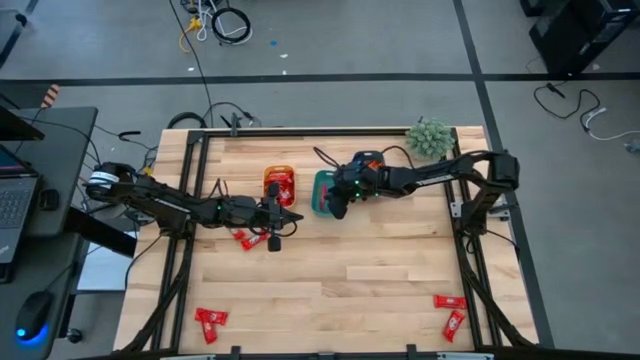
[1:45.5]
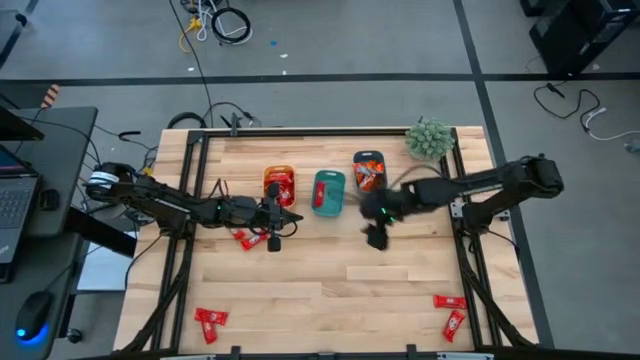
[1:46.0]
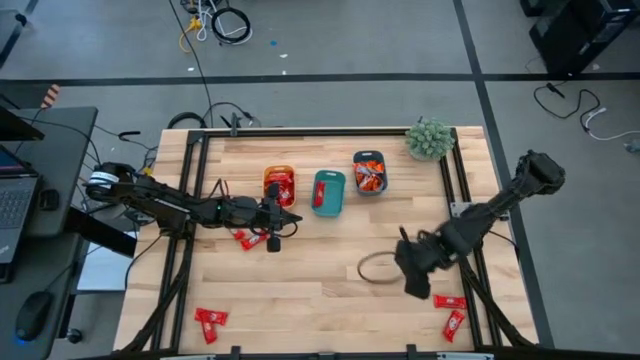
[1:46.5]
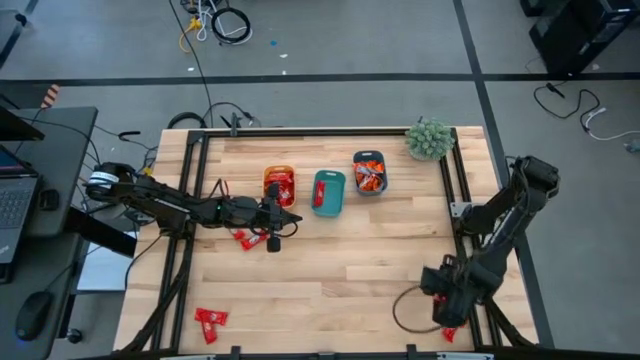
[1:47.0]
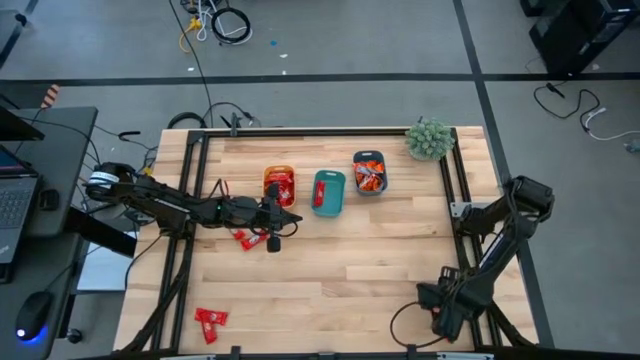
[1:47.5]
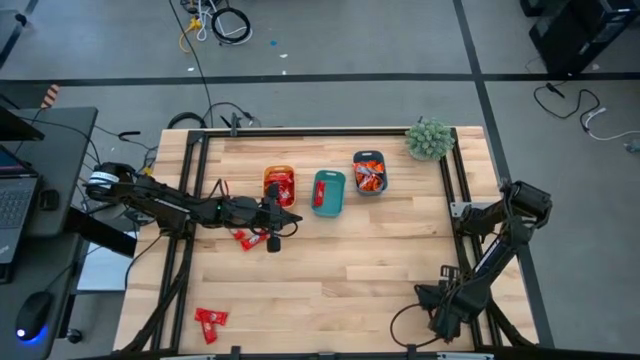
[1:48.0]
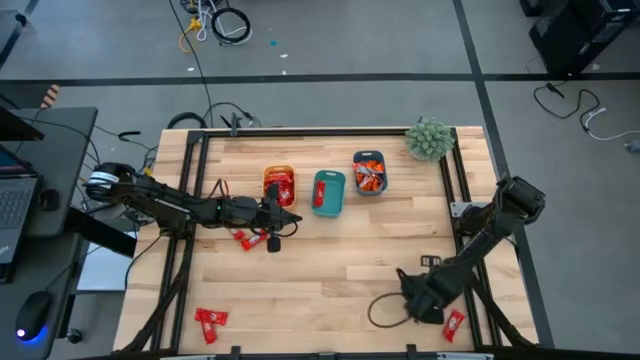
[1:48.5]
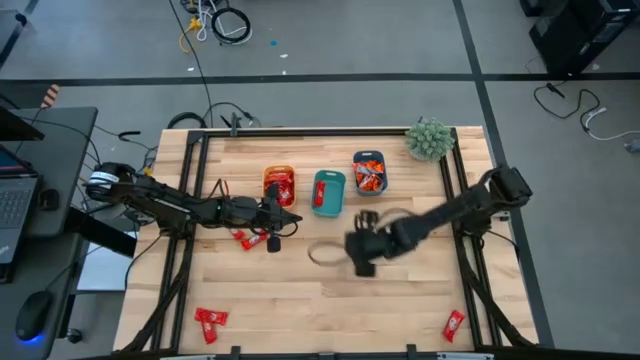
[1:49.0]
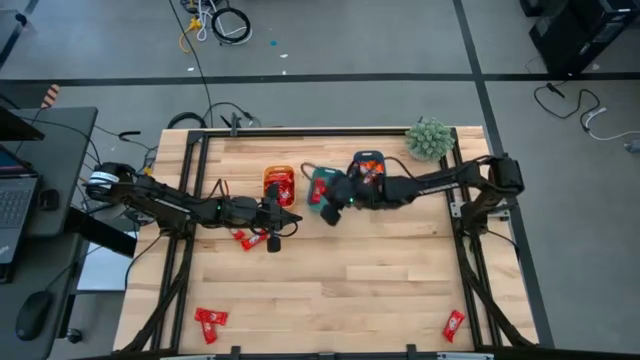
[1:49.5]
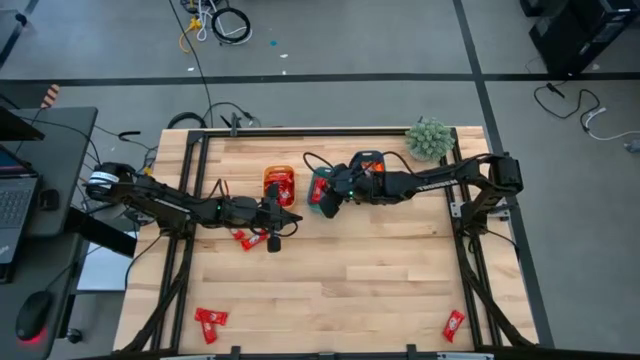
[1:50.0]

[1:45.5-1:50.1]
Task: Sort candy
Put the red chocolate into the green bin

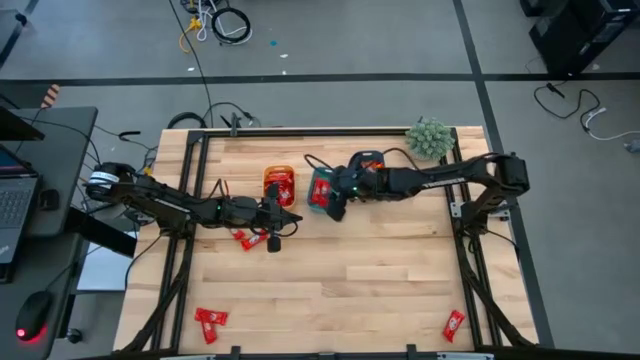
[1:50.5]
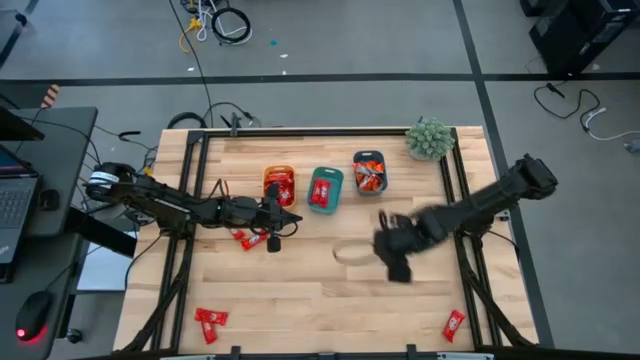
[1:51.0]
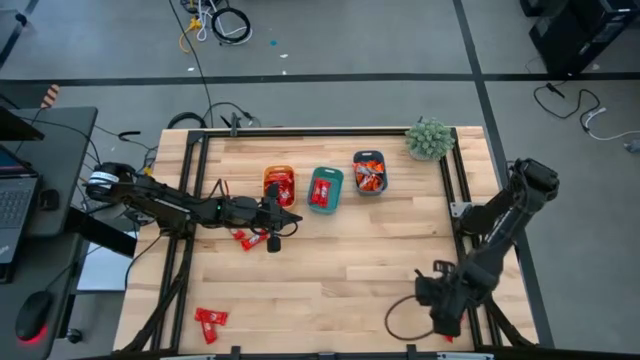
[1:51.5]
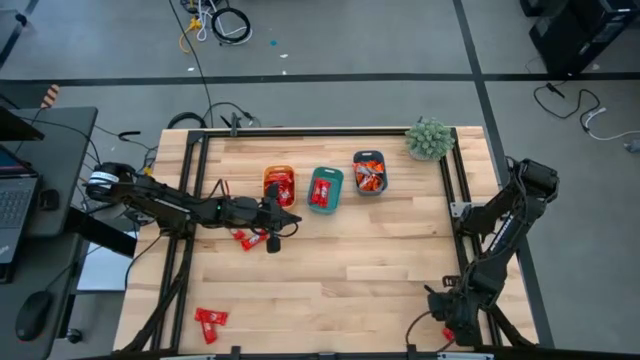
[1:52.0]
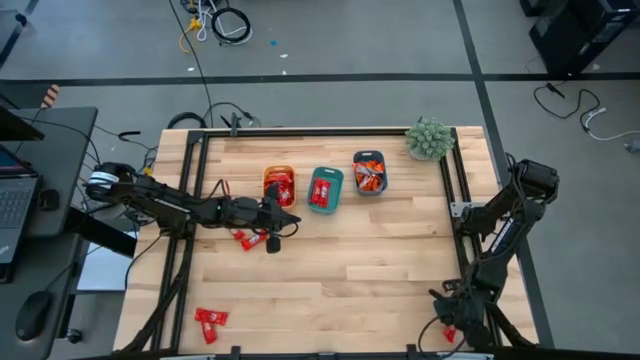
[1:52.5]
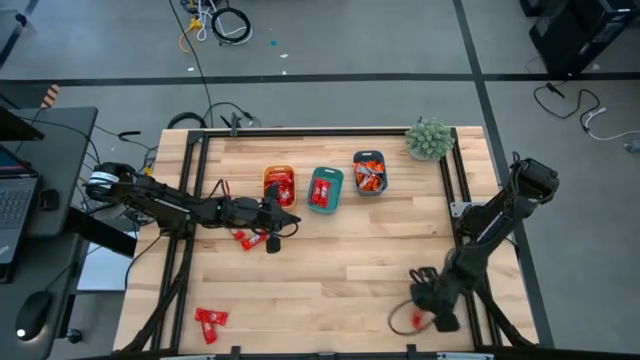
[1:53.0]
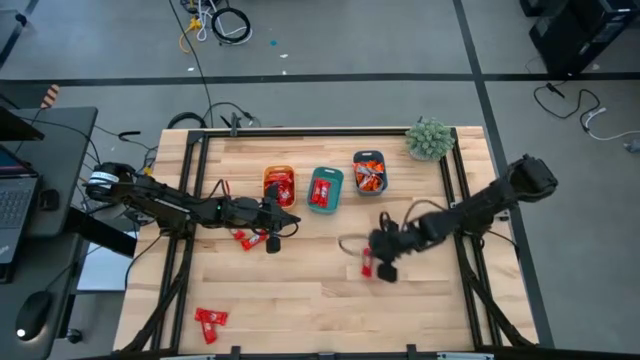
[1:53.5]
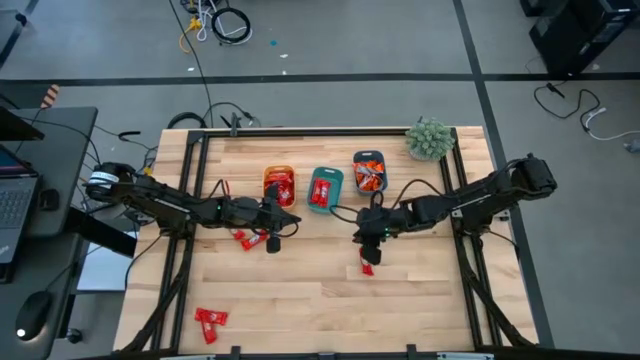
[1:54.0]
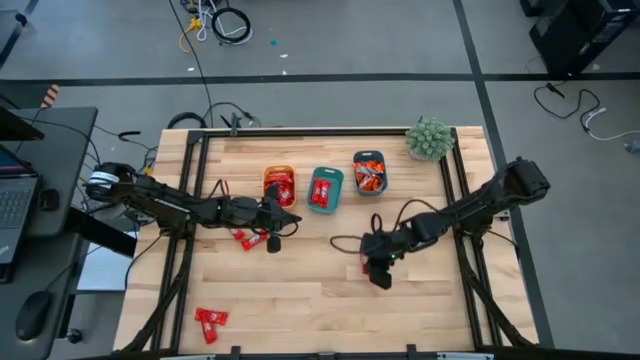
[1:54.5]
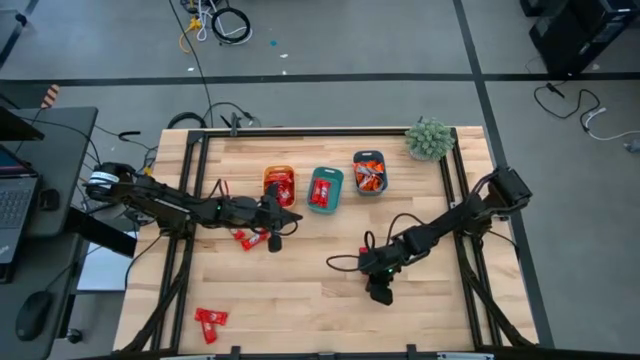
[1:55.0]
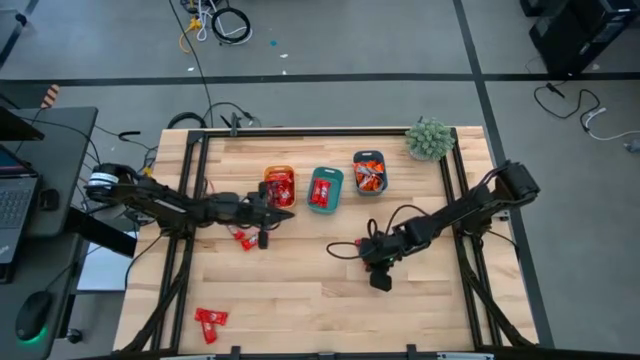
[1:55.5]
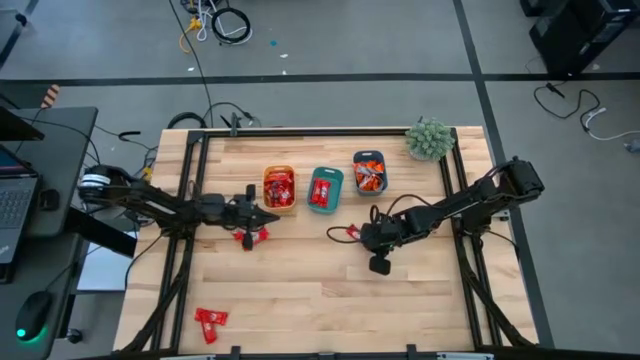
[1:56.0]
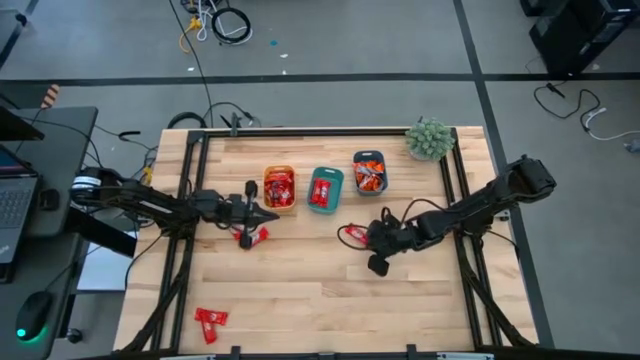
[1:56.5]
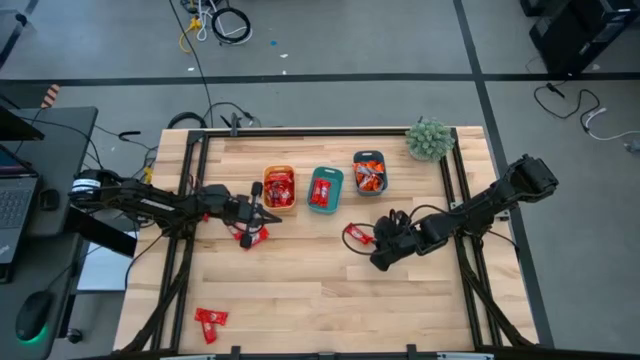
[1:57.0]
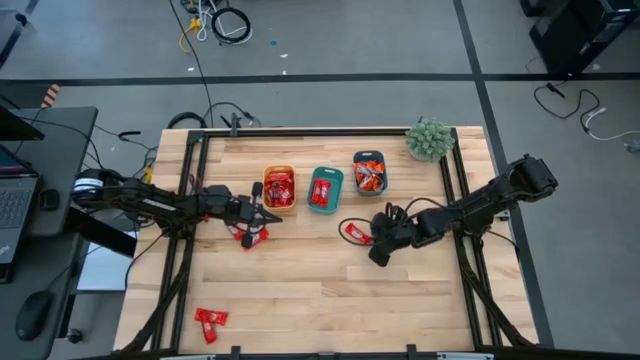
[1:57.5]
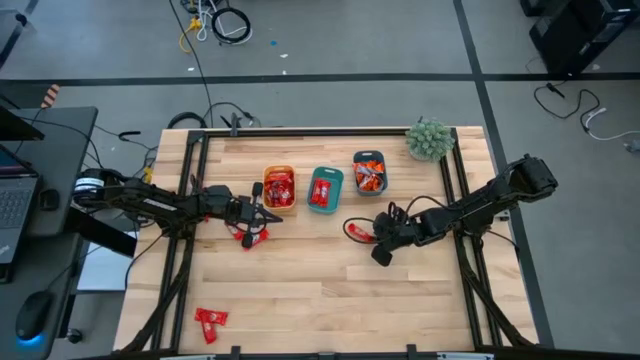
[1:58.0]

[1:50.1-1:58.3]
Put the red chocolate into the green bin

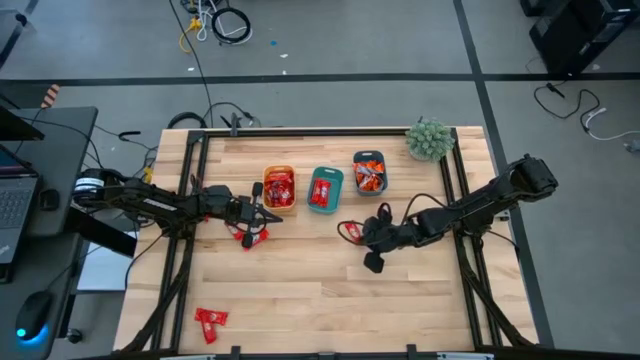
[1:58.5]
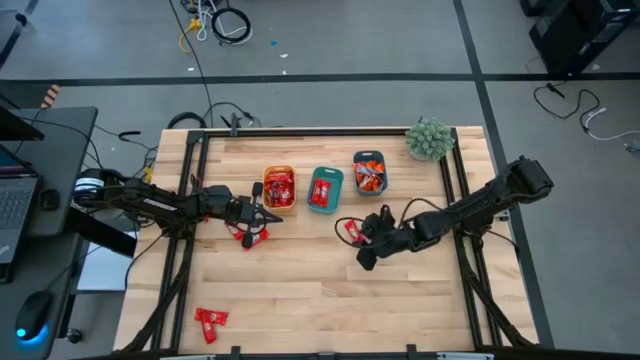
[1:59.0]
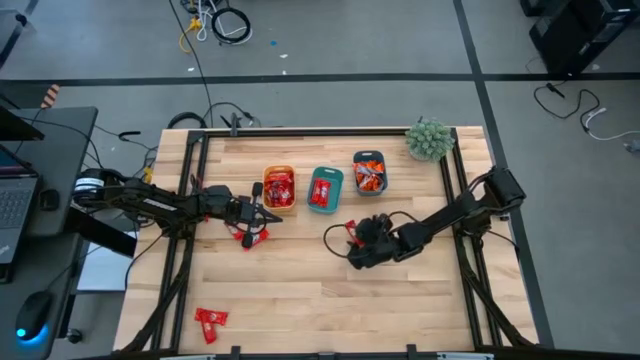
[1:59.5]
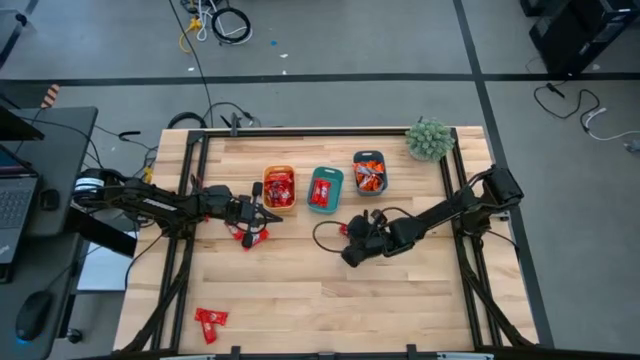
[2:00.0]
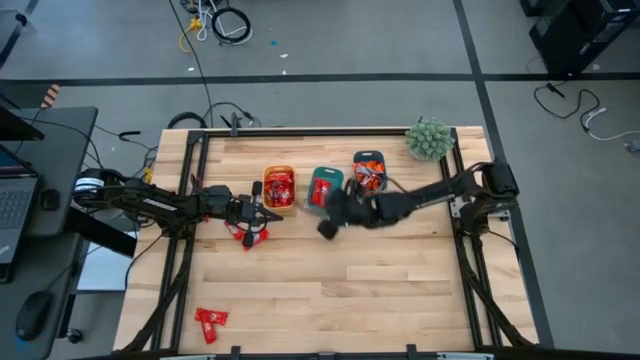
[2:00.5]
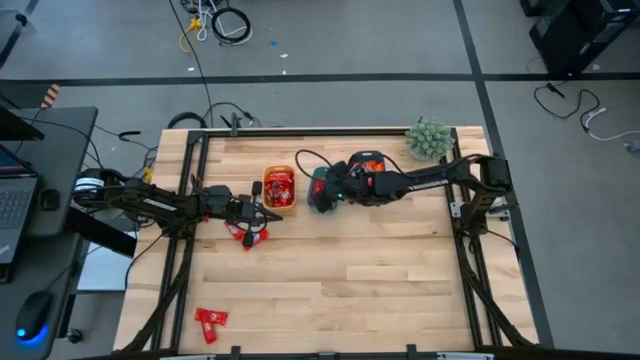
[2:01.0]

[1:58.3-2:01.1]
Put the red chocolate into the green bin

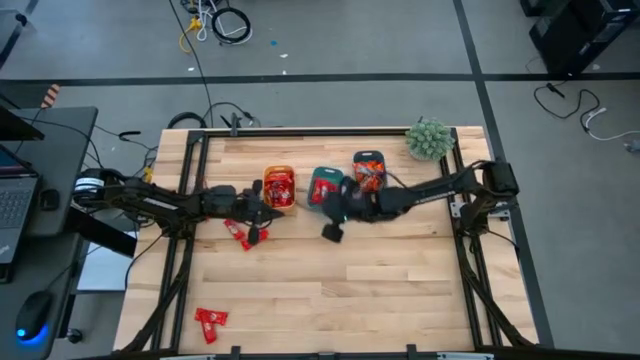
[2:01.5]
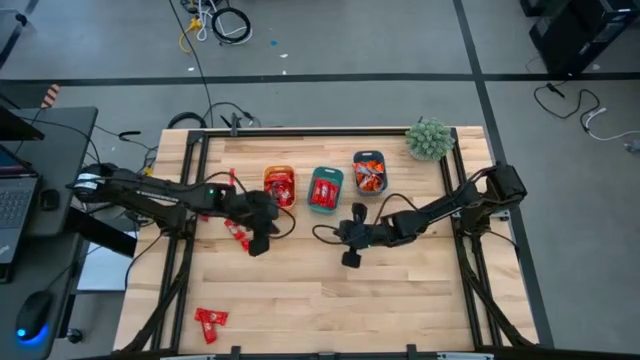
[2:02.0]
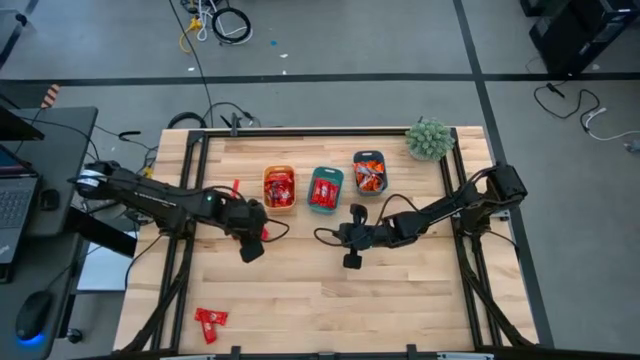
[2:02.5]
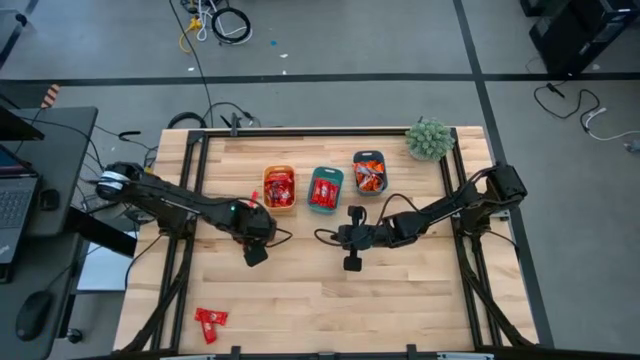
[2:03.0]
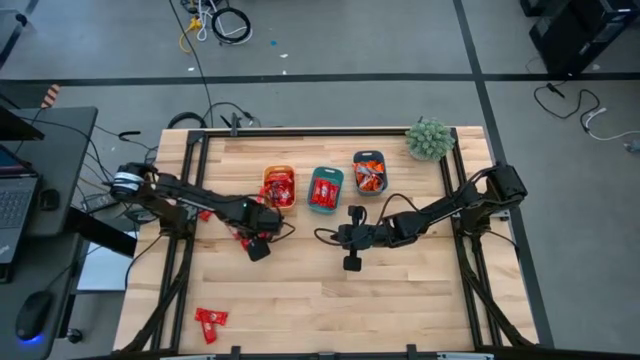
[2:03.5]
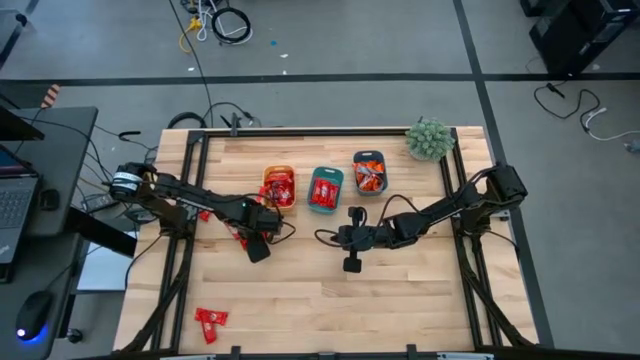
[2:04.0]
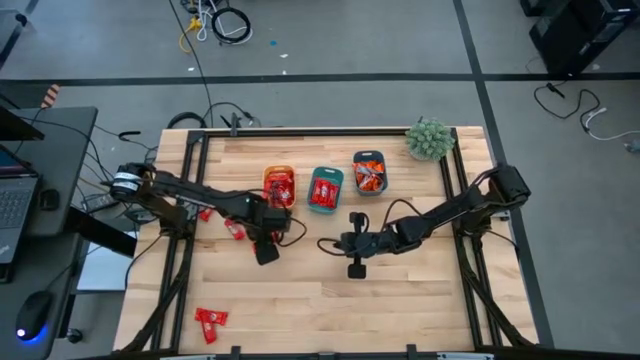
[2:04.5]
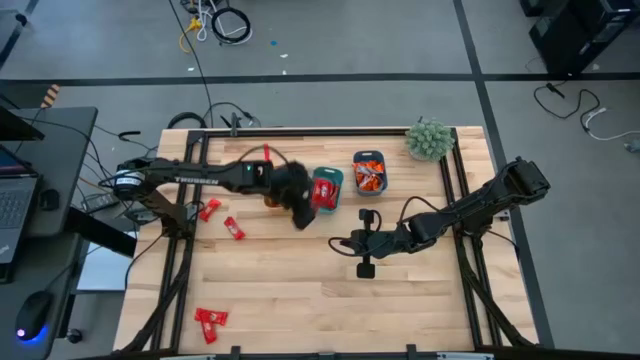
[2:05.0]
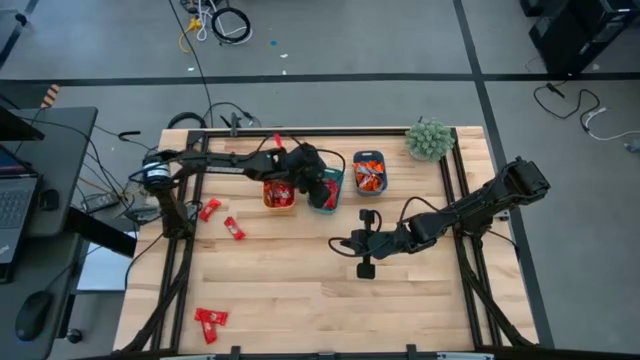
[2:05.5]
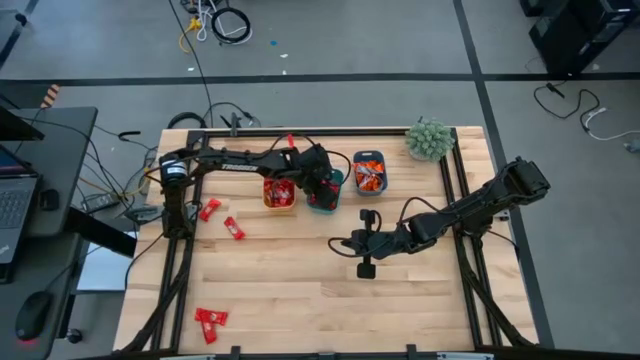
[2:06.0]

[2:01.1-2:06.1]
Put the red chocolate into the green bin

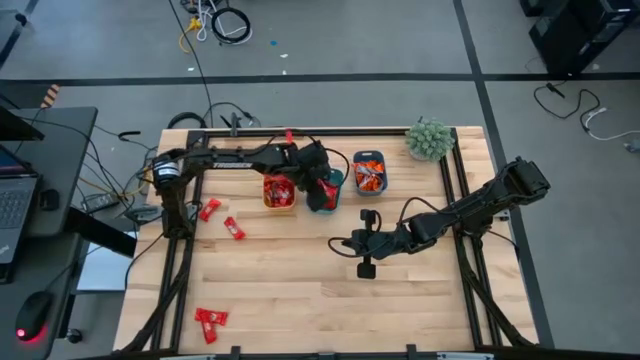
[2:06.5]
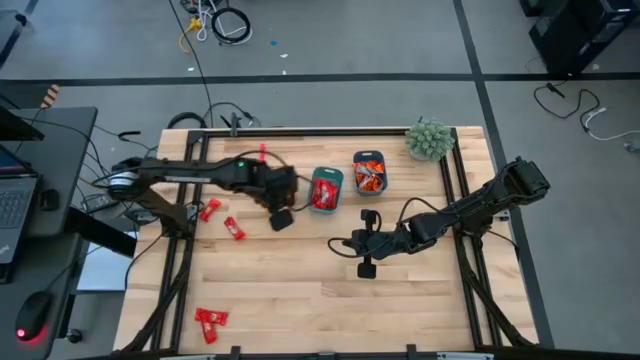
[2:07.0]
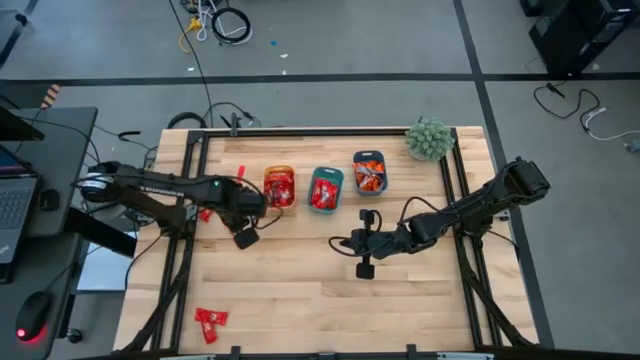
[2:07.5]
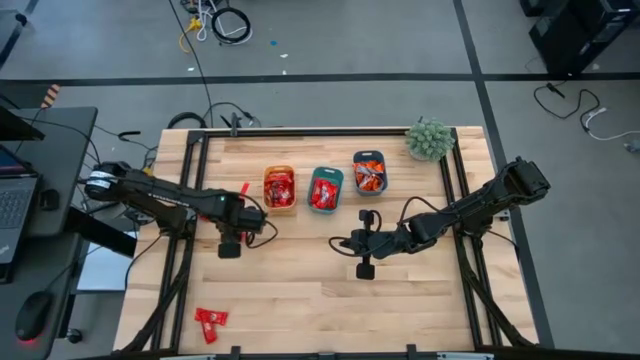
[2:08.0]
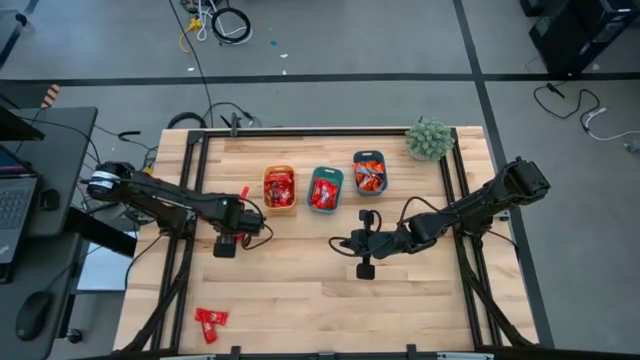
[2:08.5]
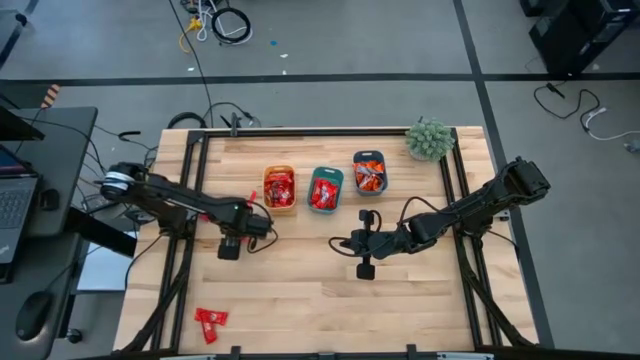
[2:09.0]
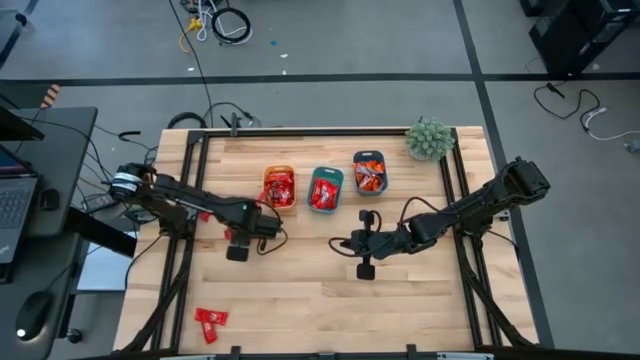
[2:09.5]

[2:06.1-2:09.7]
Put the red chocolate into the green bin
